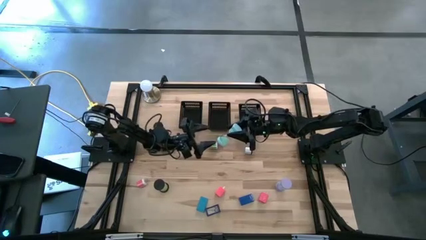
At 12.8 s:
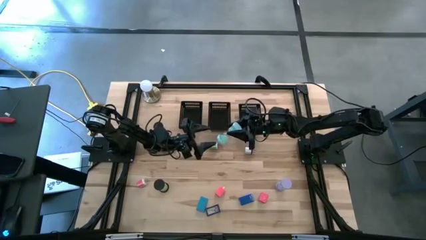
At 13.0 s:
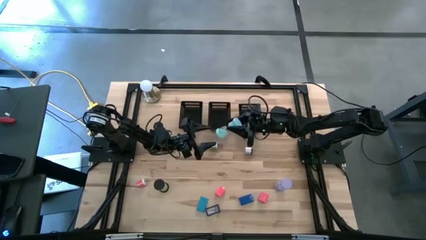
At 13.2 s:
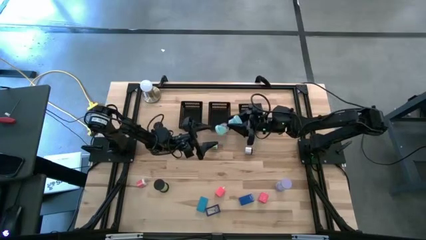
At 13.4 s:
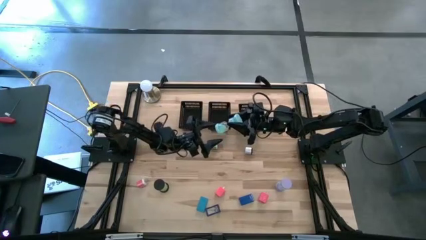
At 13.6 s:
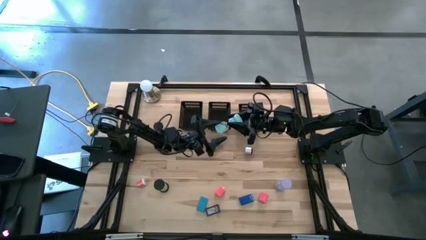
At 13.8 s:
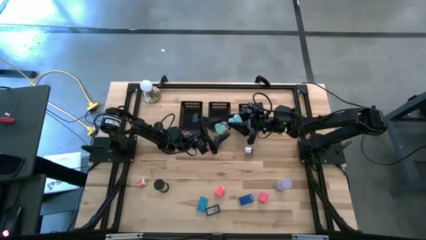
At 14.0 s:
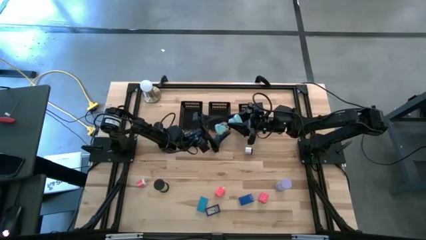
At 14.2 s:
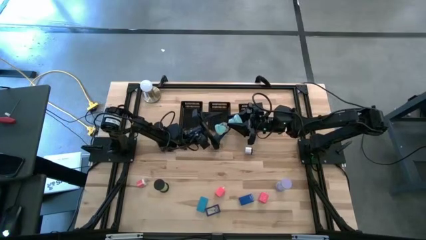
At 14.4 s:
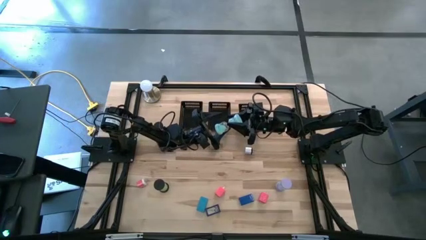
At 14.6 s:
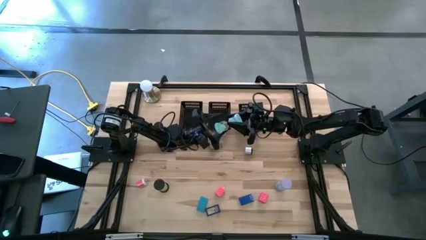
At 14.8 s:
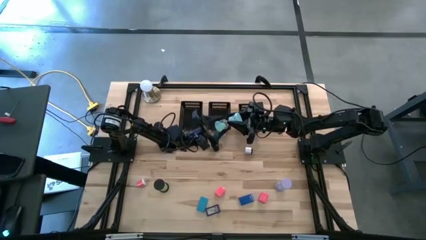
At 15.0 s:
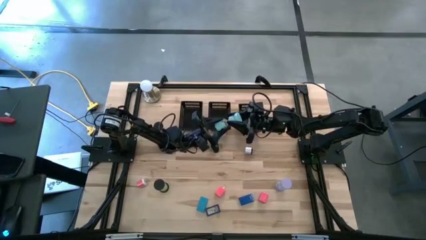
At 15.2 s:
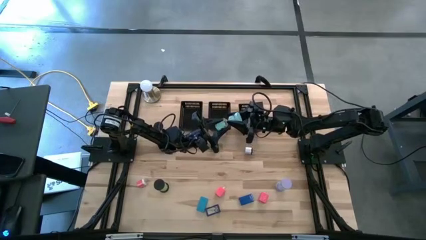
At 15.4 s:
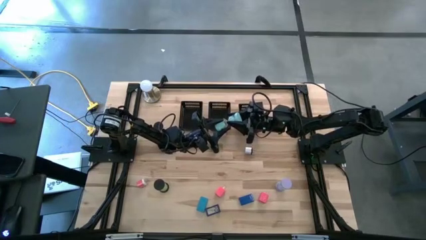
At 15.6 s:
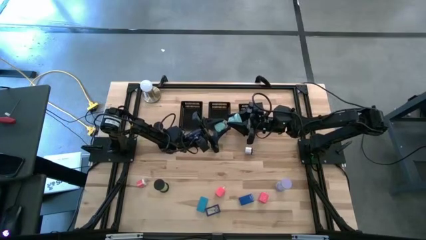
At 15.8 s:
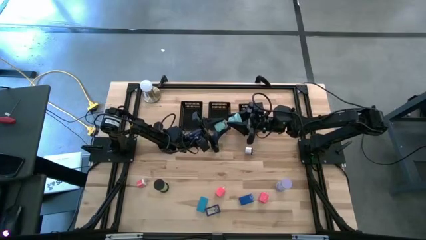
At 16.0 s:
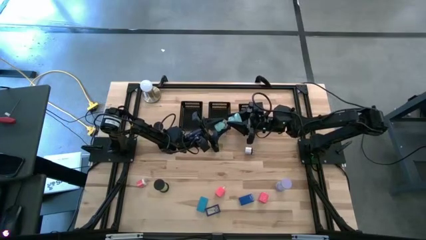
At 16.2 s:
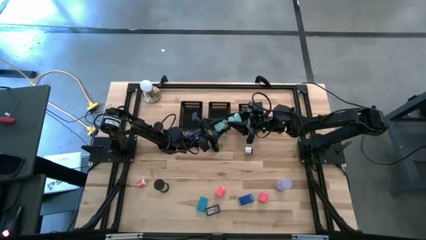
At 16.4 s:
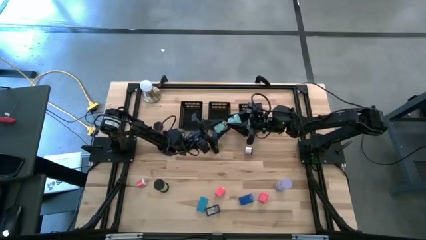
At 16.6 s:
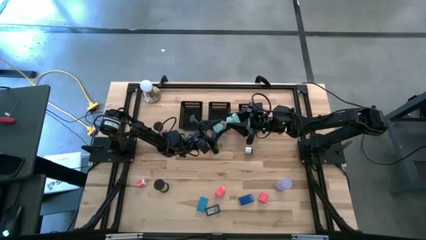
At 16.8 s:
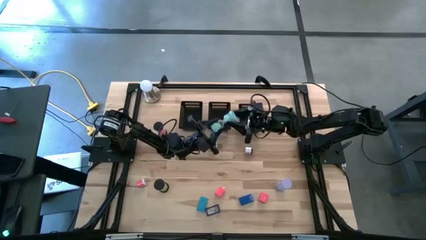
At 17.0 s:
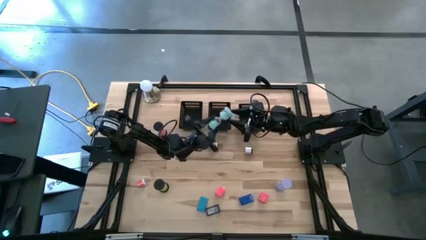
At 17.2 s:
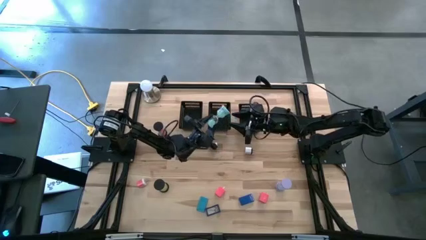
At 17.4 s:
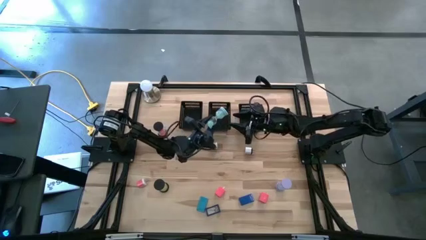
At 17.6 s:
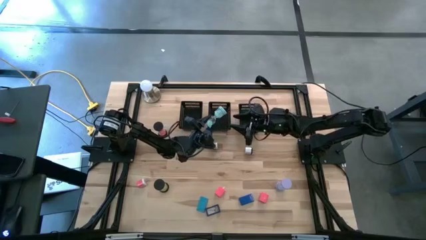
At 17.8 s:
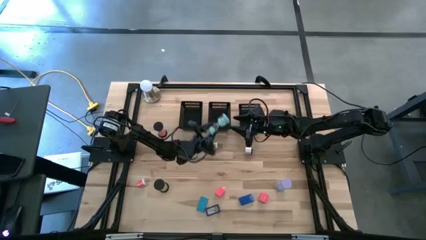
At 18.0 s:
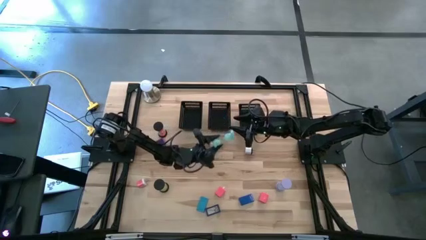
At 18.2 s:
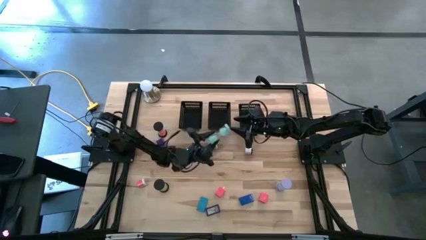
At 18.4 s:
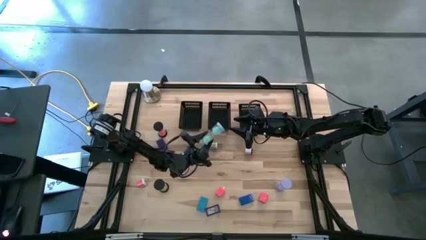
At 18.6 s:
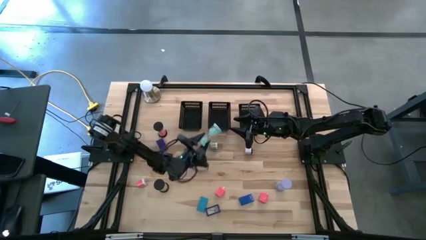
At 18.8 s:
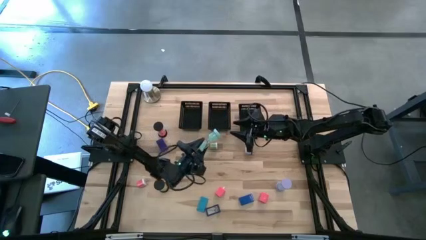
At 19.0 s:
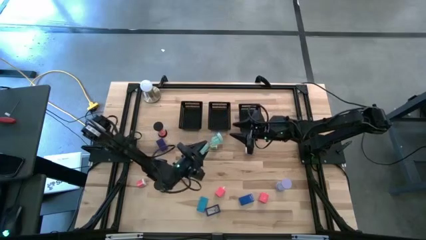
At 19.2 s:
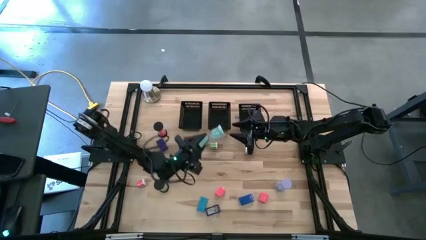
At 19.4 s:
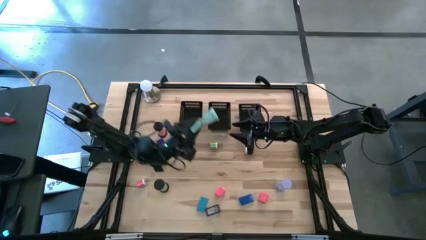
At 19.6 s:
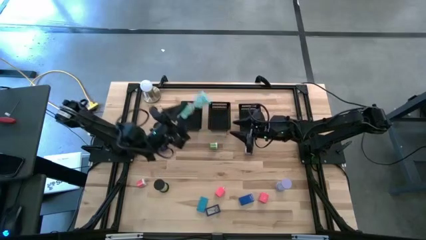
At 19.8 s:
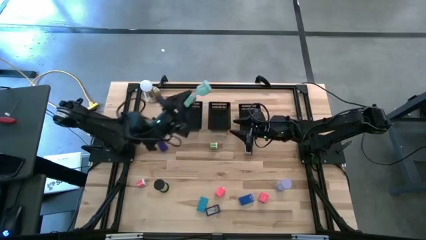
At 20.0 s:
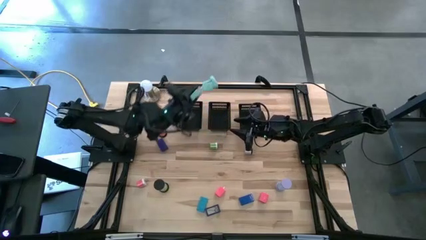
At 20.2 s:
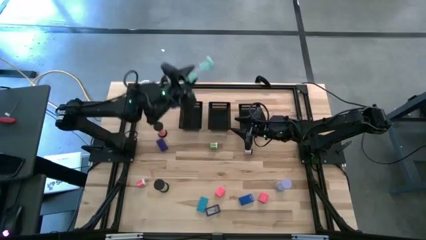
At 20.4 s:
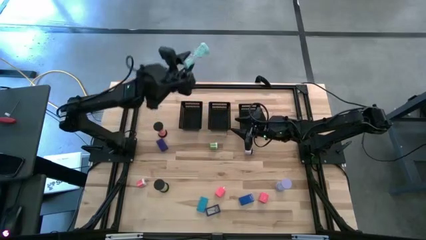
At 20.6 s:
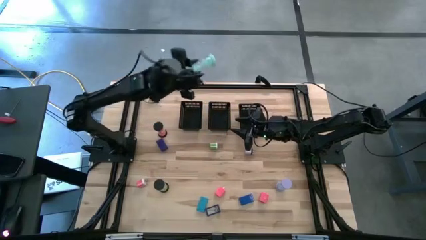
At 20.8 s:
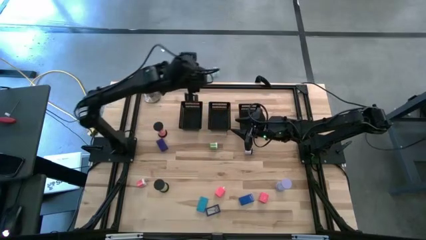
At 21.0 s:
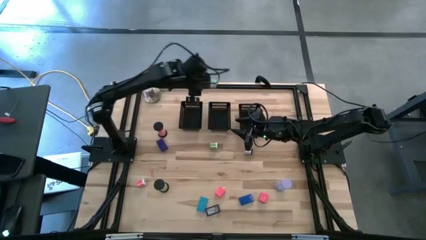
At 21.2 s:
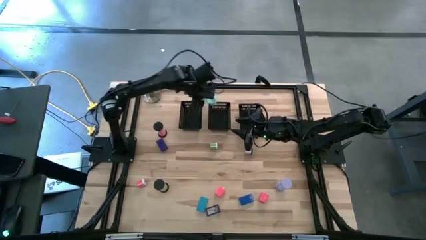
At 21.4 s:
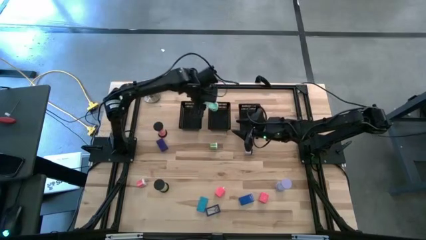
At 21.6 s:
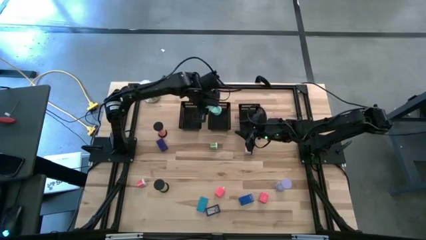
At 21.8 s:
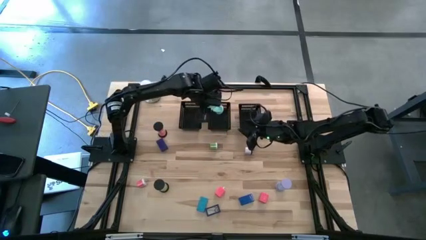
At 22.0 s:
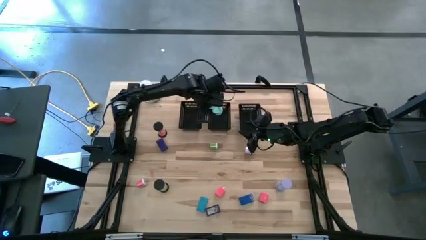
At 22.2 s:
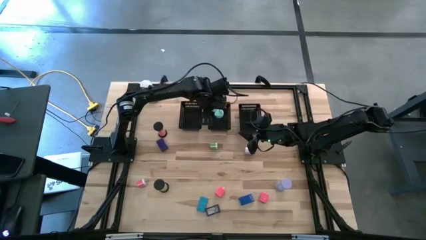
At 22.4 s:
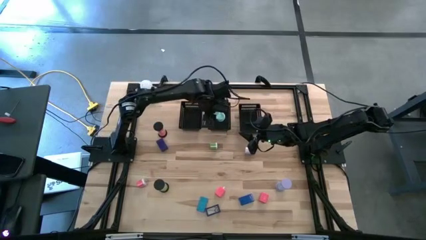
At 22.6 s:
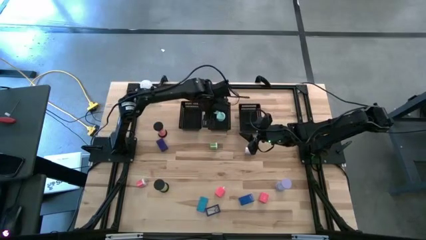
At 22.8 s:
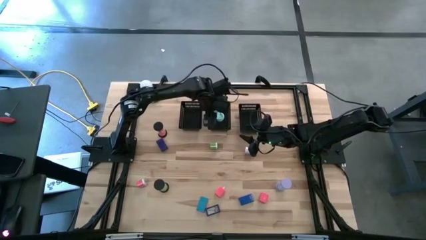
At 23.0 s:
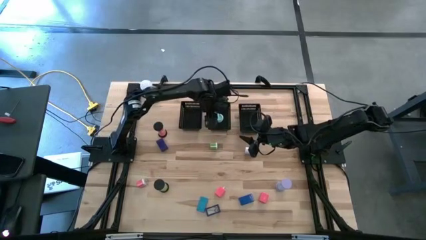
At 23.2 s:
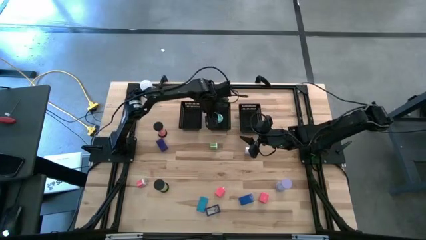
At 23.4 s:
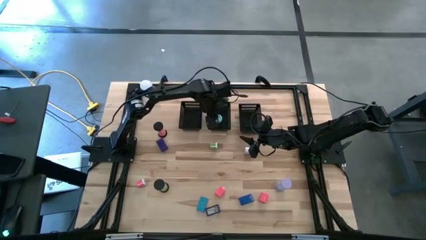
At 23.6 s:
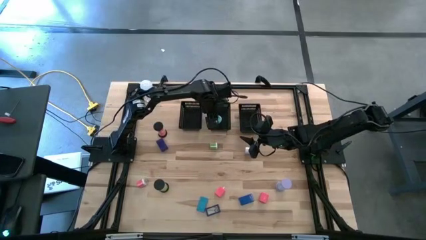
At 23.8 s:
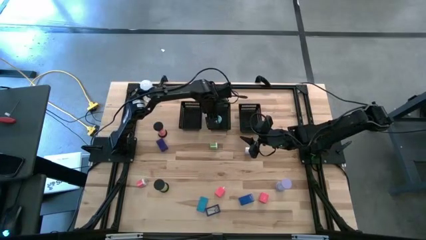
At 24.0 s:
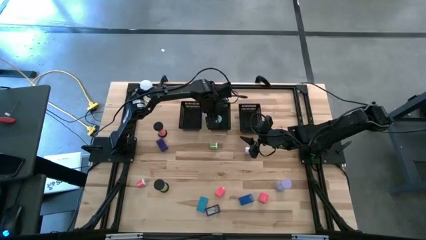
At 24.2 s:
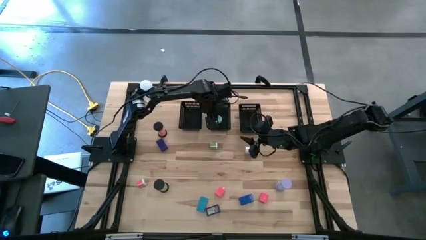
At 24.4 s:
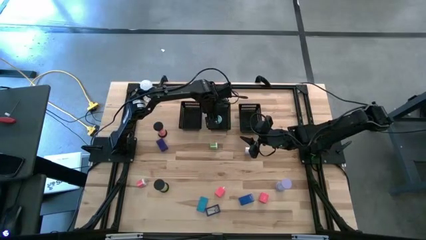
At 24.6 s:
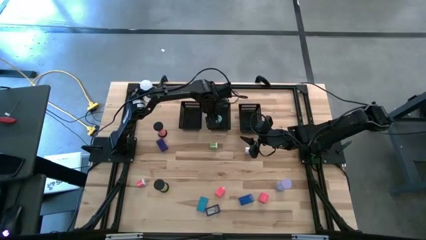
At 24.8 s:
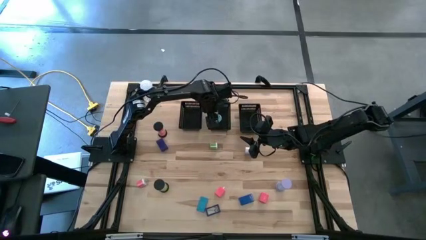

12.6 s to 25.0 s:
Task: Pick & Place Office items
Put the blue hourglass into the middle black bin
